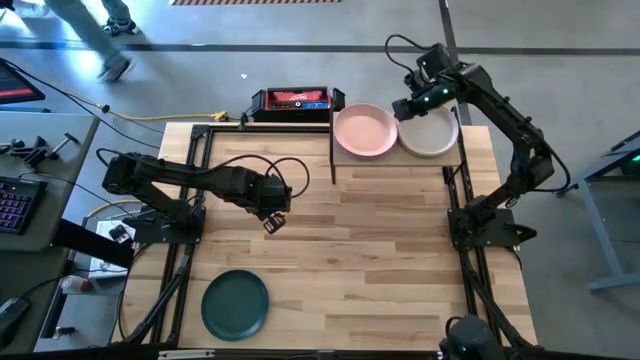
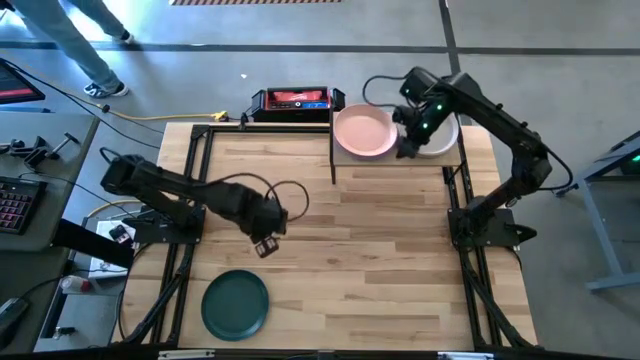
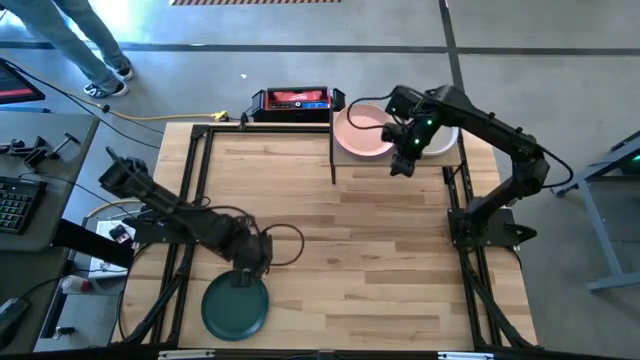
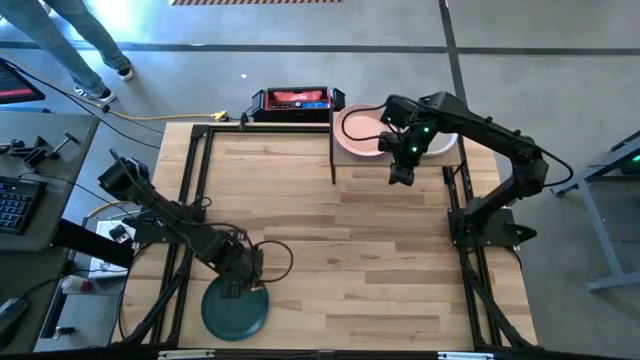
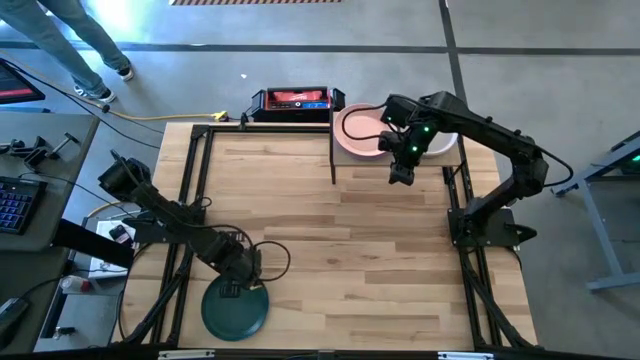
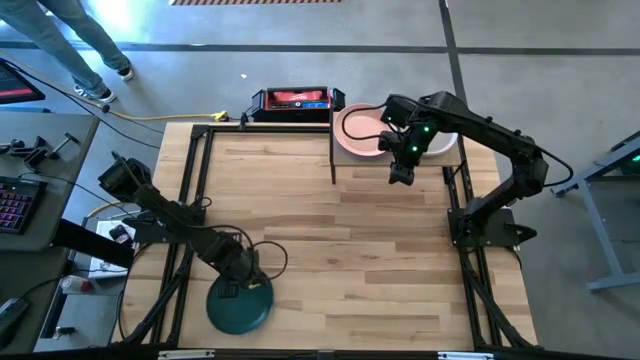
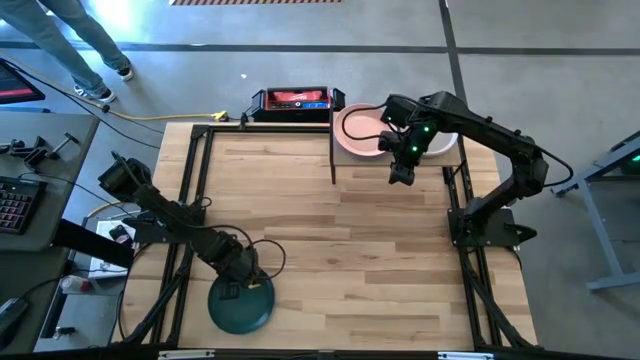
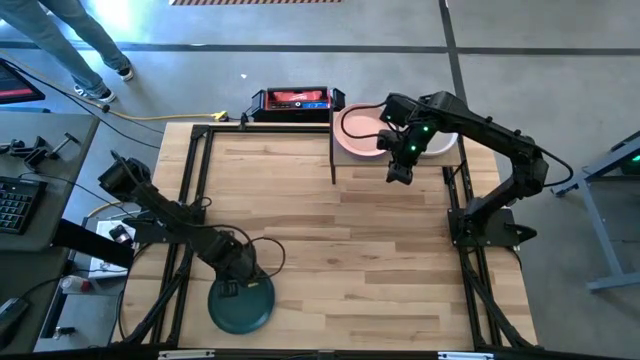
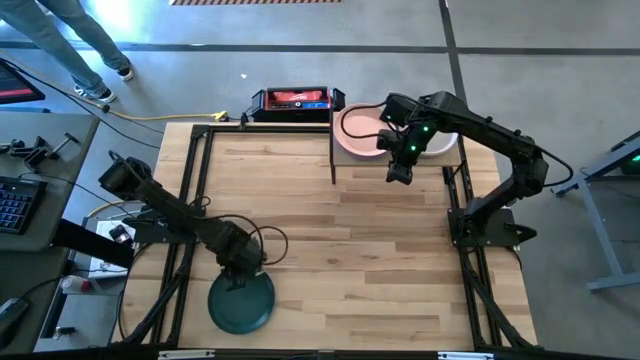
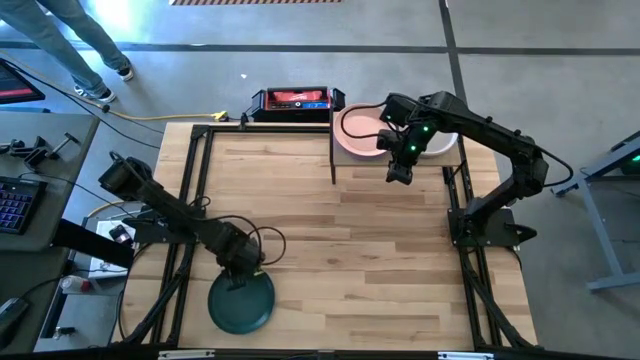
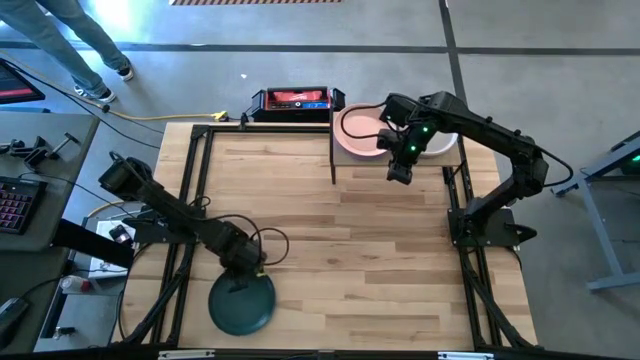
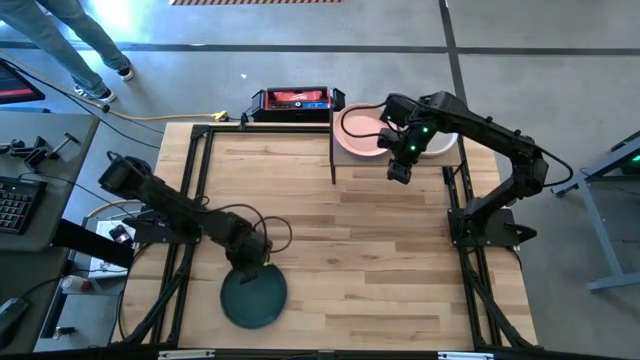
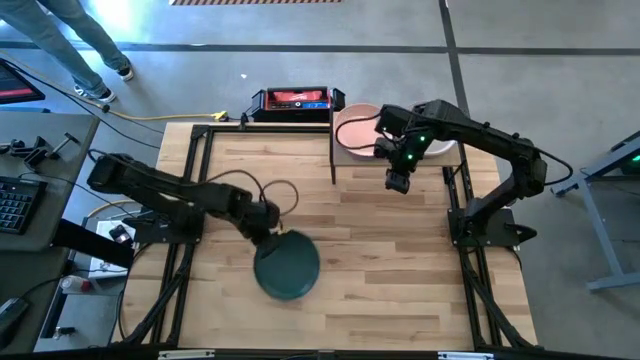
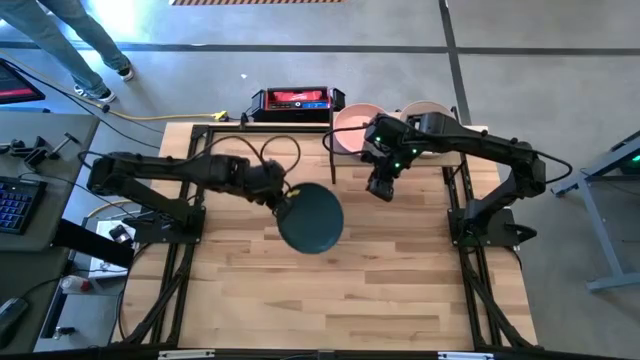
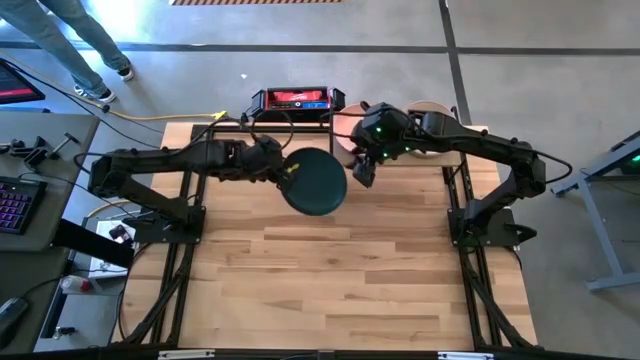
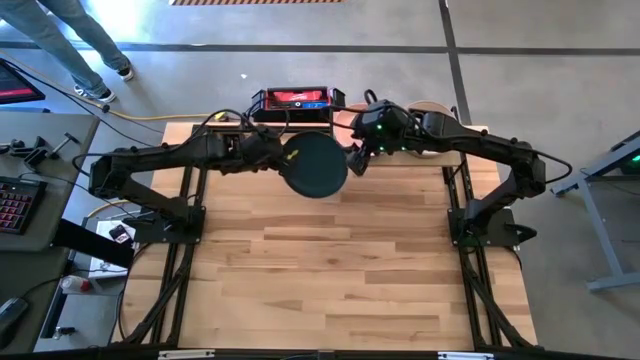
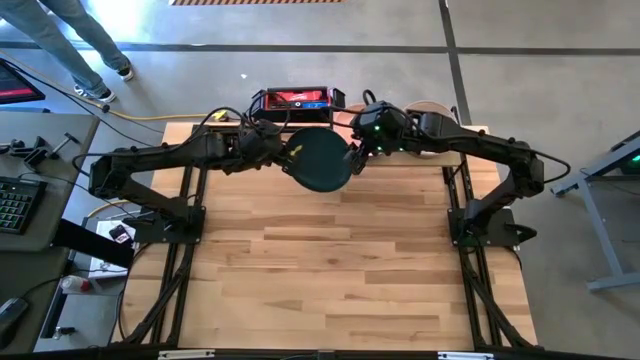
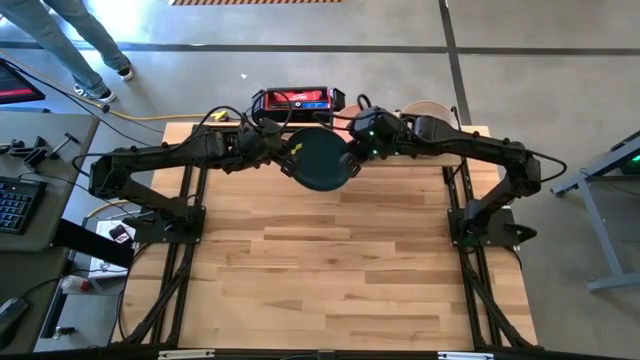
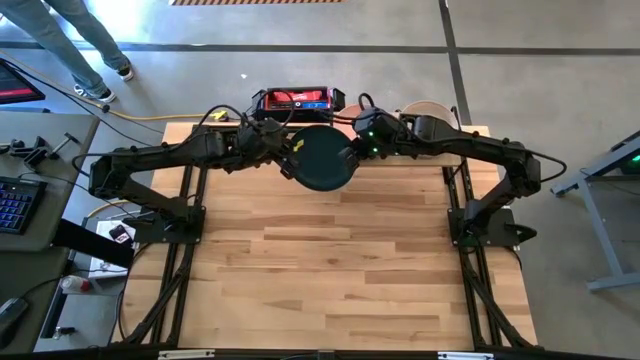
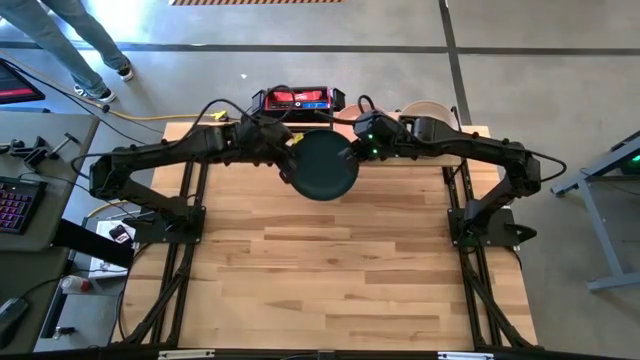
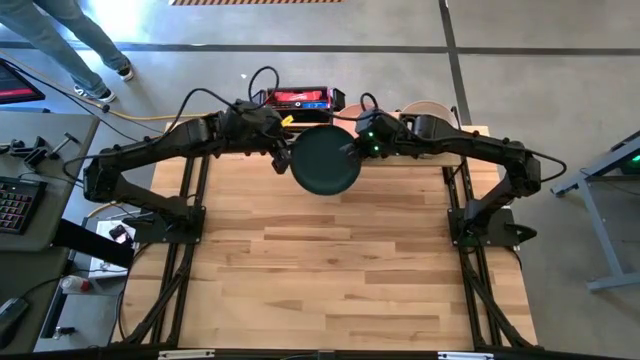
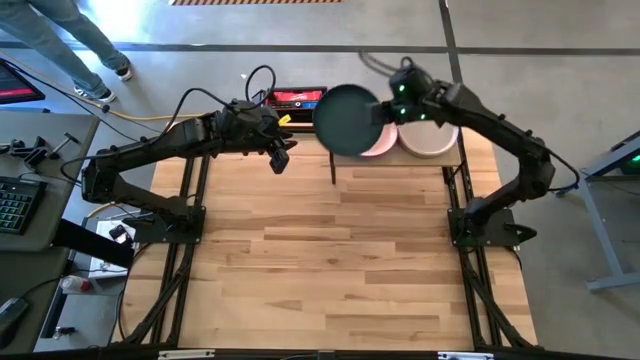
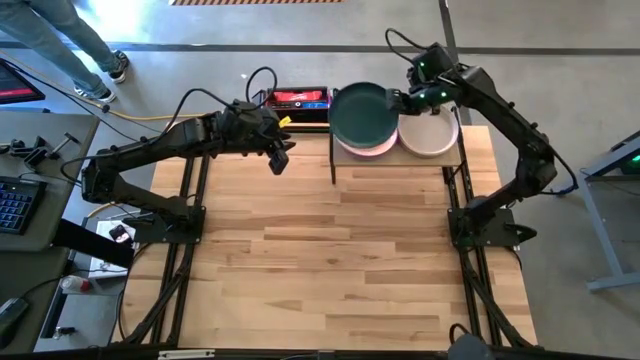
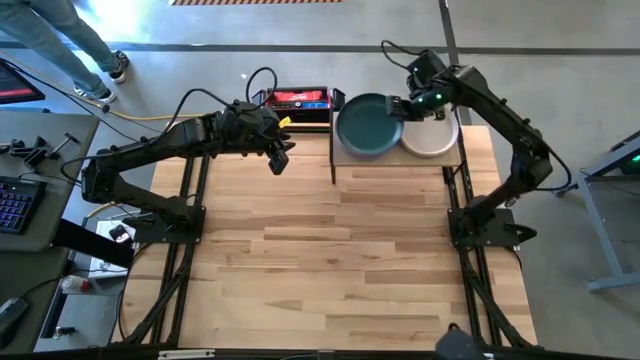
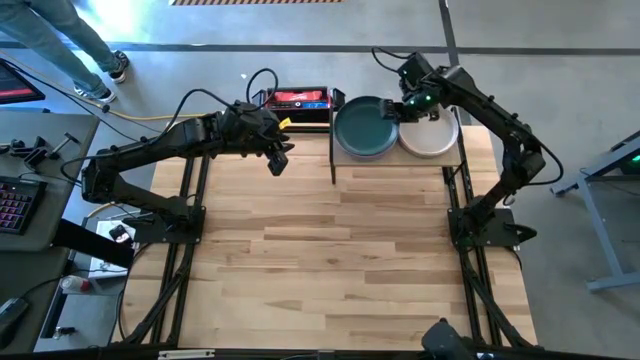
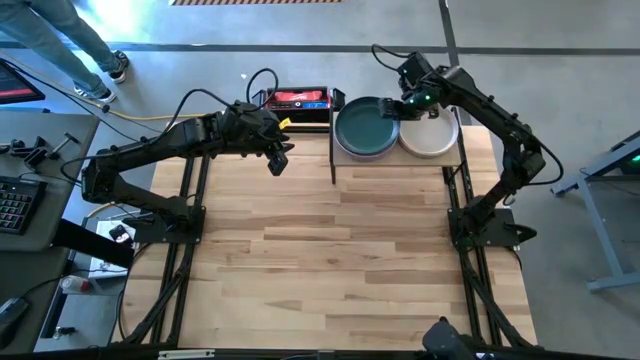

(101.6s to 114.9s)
Task: Place and stack plates onto a shelf
Stack the green plate on the light orange stacked plates on the shelf

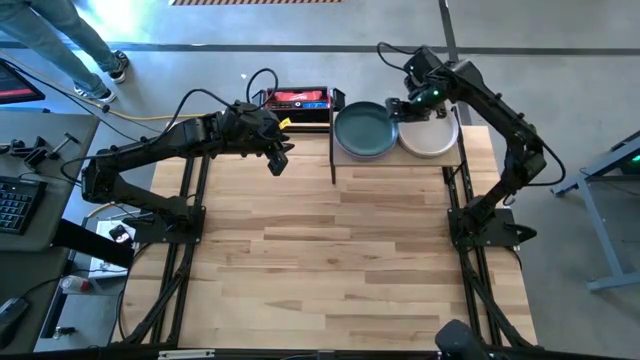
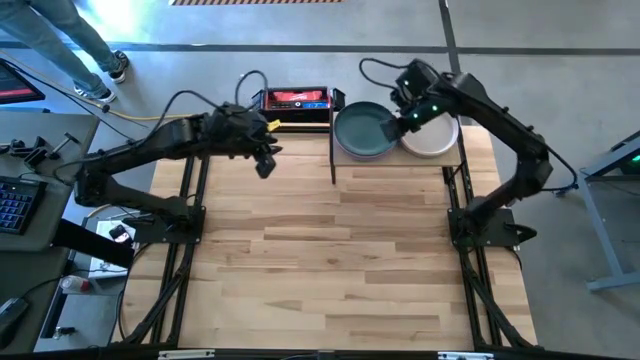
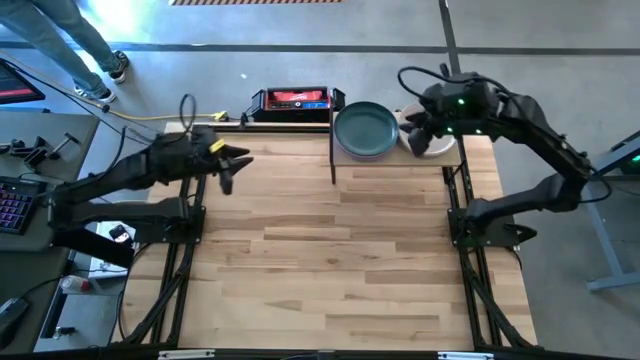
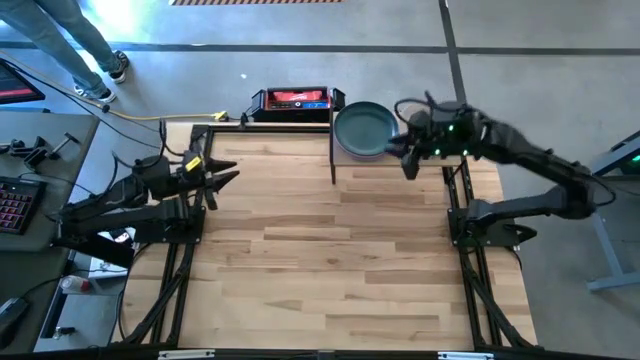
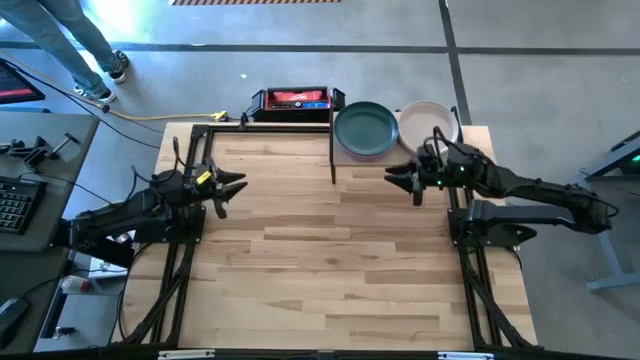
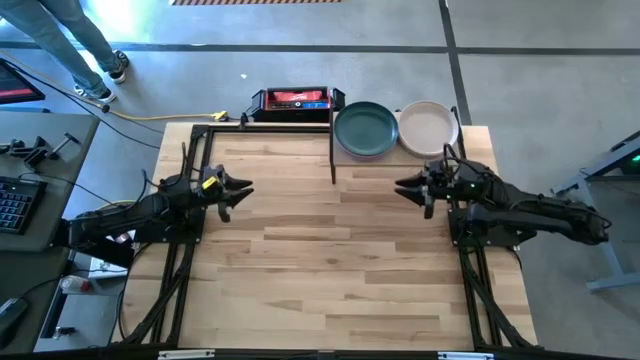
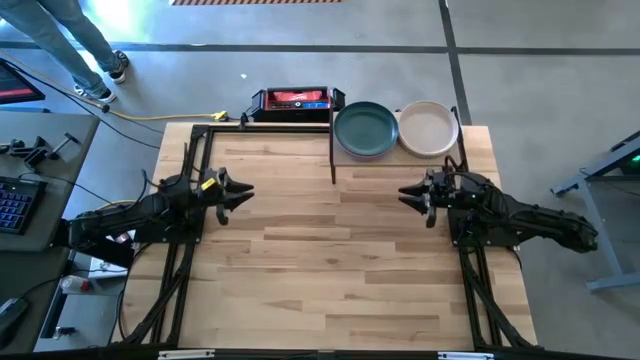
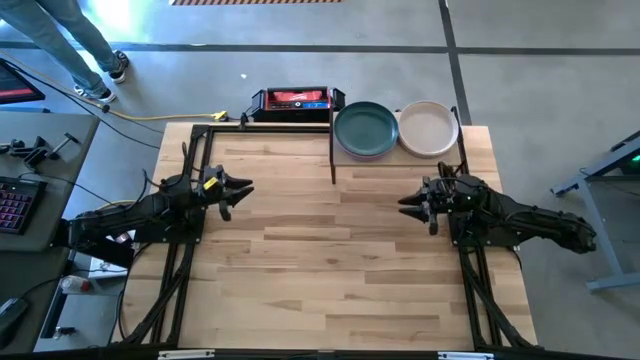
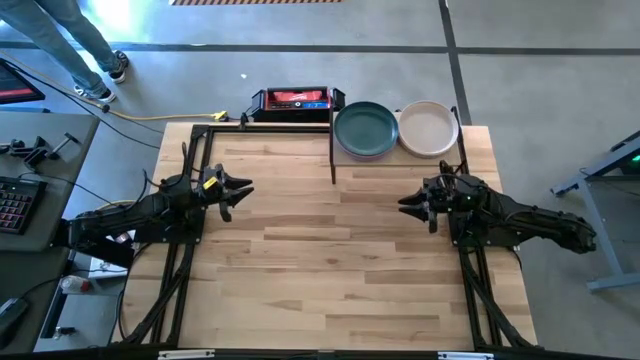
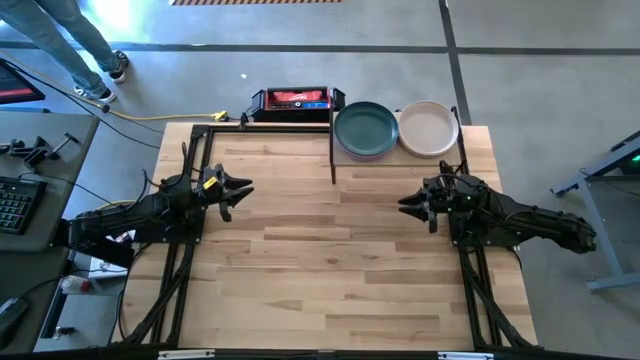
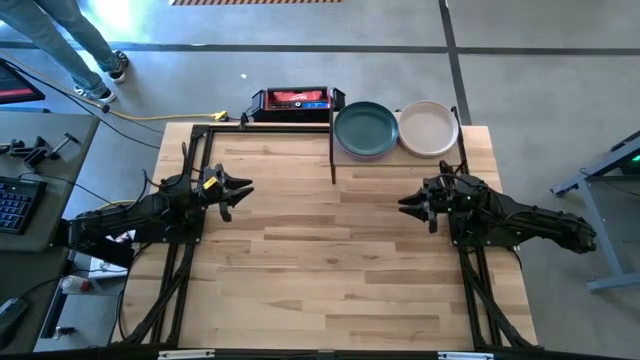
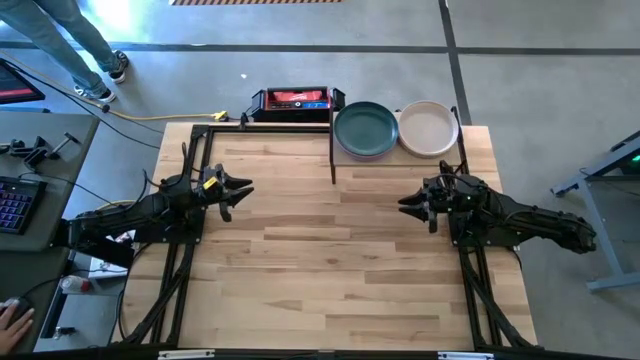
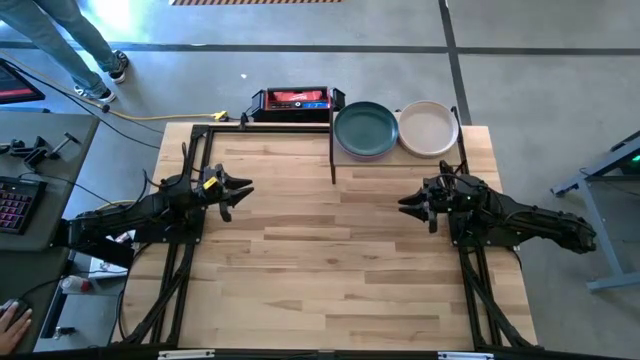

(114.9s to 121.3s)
Return to Home Position

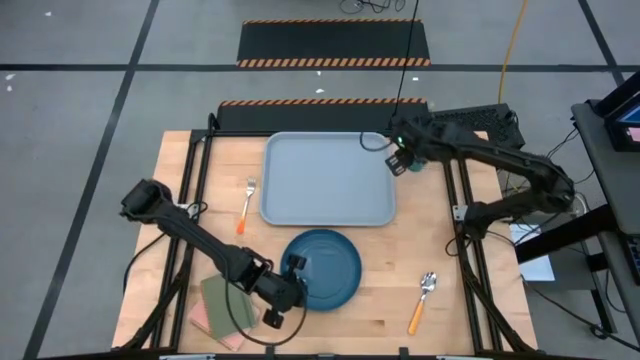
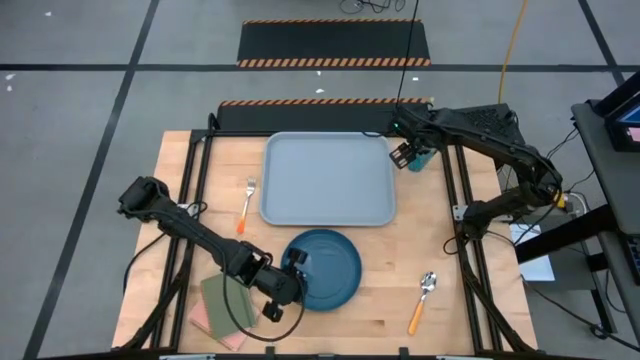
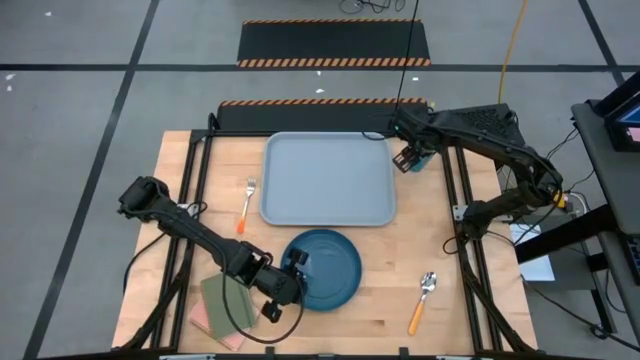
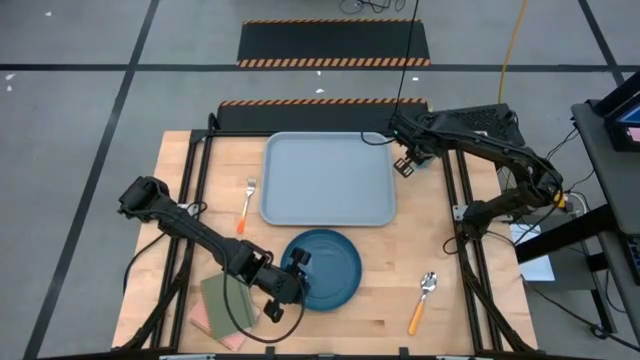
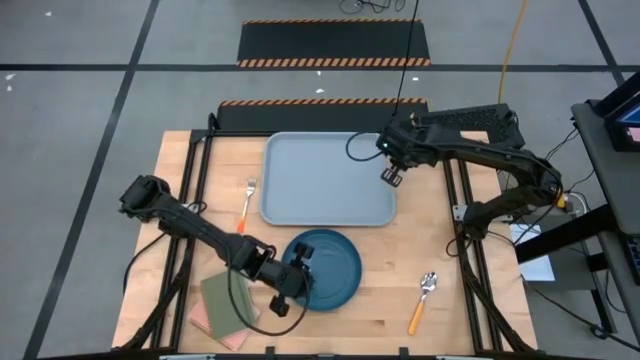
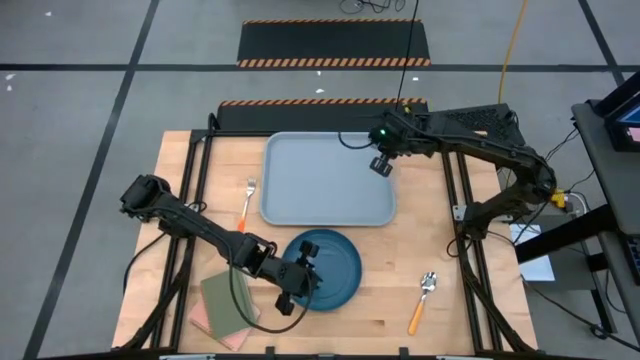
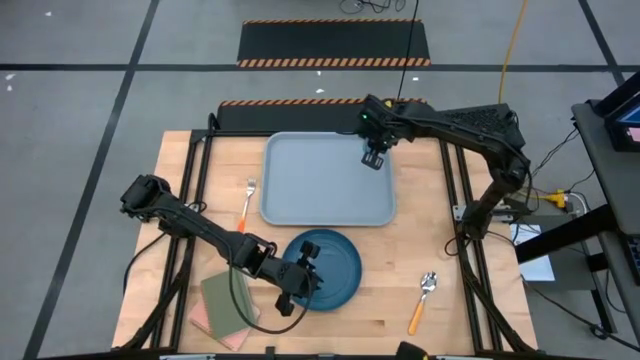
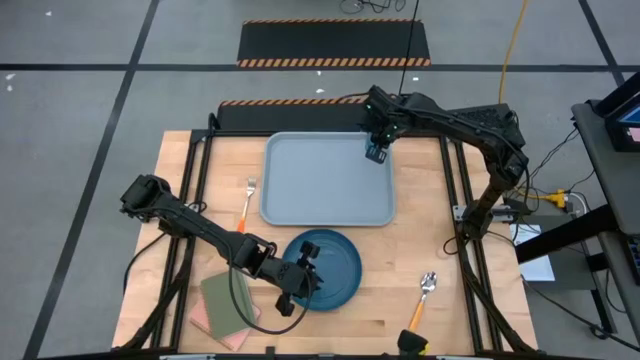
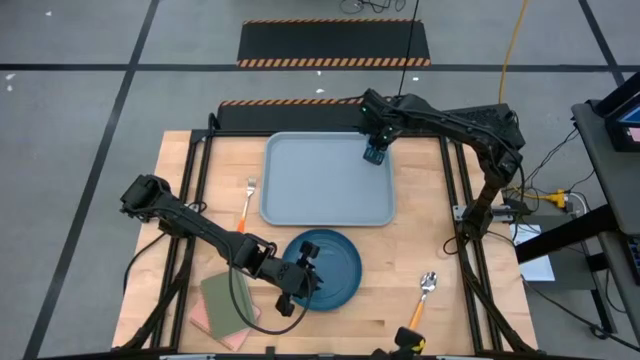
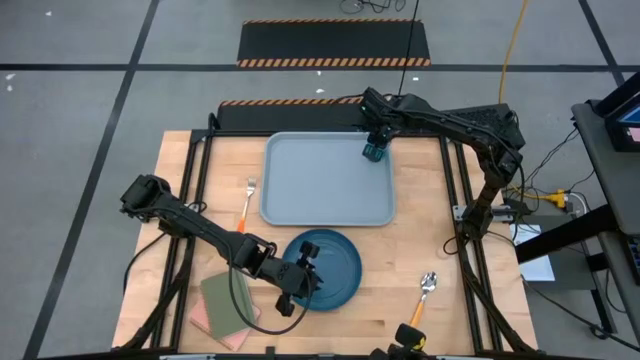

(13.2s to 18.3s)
Task: Pick and place plate/cup/fork/spoon on tray
Put the blue cup on the blue tray
